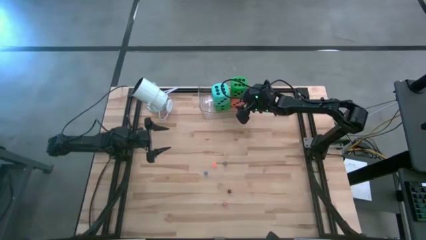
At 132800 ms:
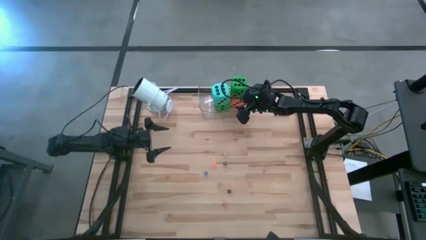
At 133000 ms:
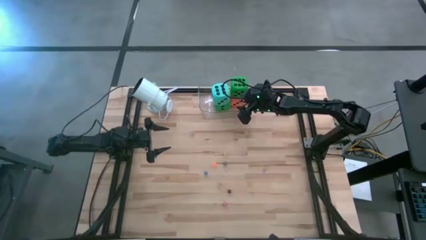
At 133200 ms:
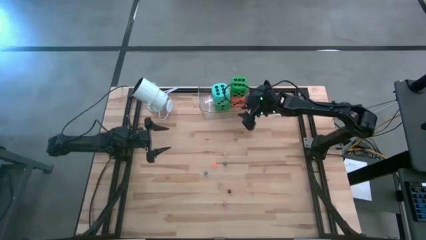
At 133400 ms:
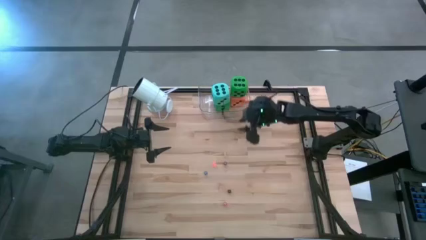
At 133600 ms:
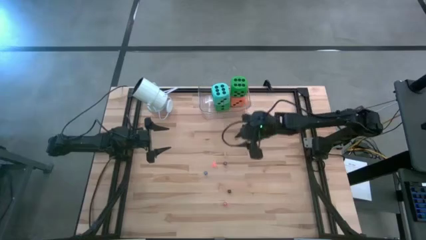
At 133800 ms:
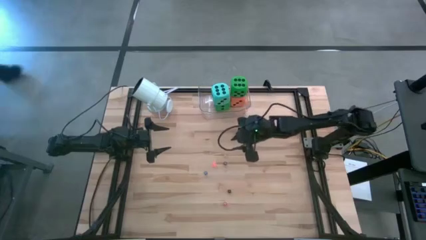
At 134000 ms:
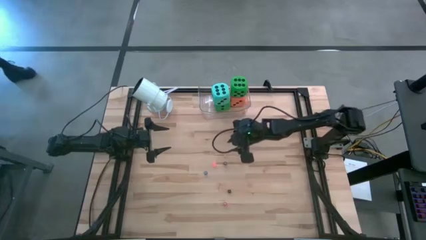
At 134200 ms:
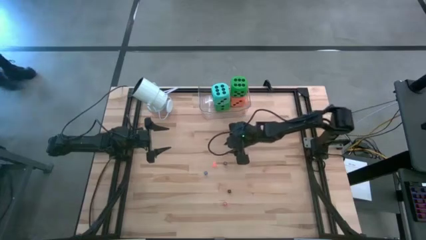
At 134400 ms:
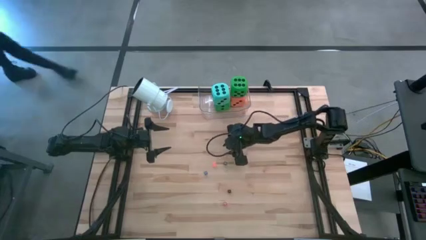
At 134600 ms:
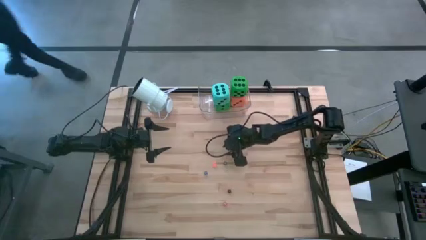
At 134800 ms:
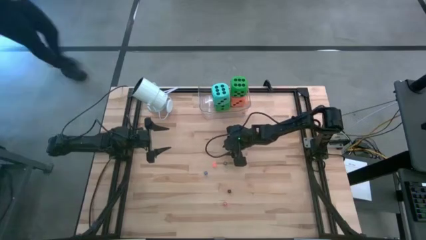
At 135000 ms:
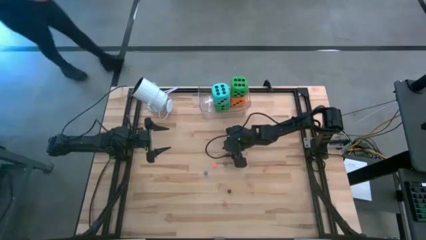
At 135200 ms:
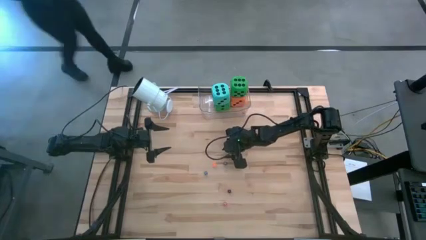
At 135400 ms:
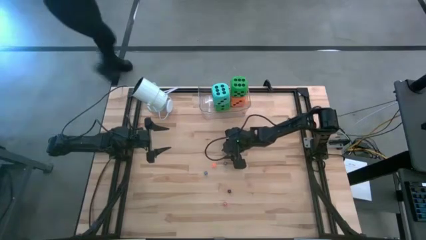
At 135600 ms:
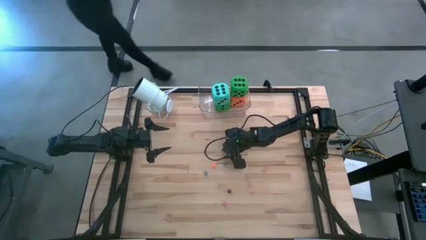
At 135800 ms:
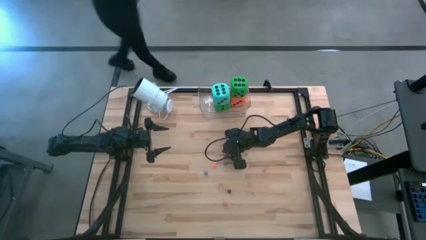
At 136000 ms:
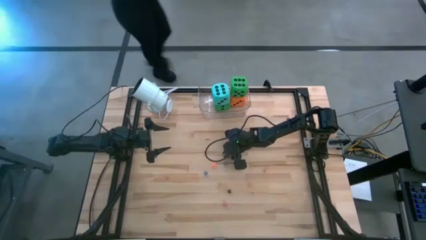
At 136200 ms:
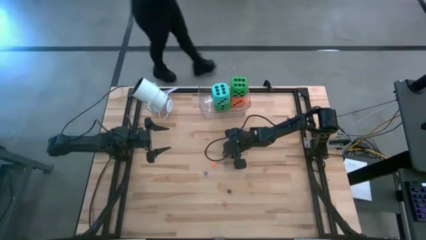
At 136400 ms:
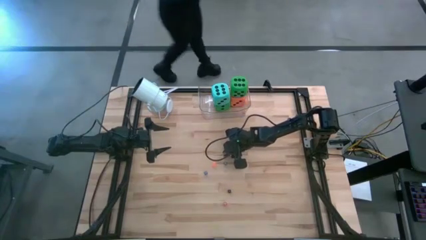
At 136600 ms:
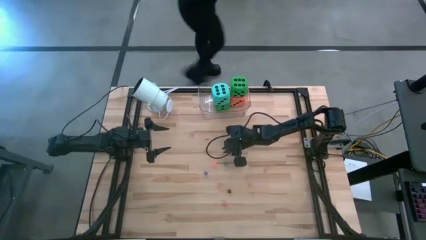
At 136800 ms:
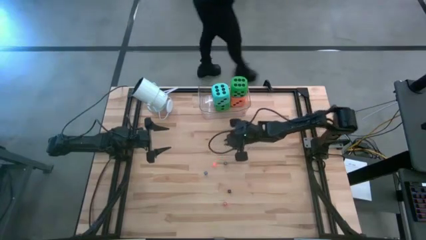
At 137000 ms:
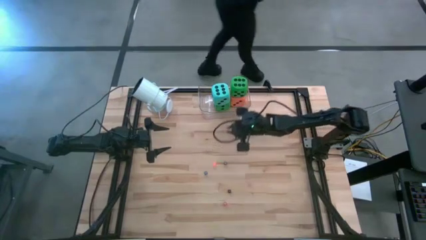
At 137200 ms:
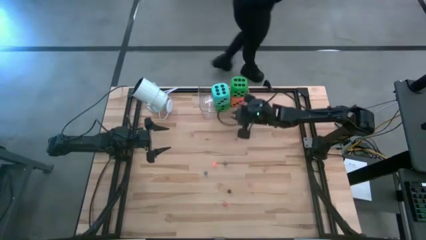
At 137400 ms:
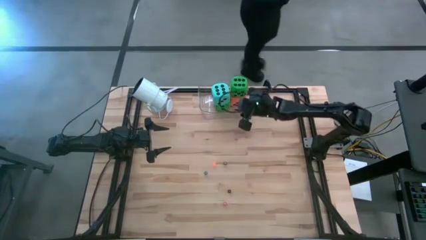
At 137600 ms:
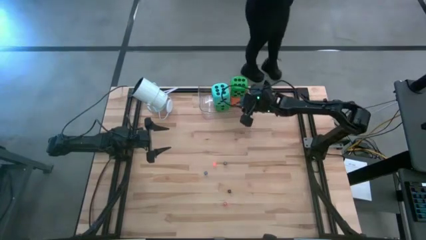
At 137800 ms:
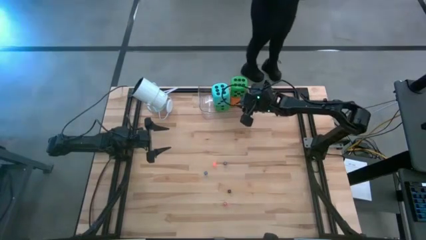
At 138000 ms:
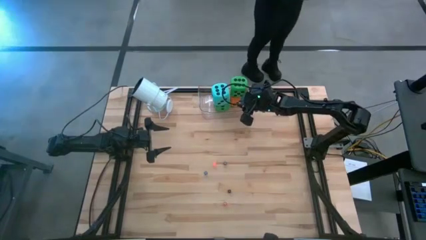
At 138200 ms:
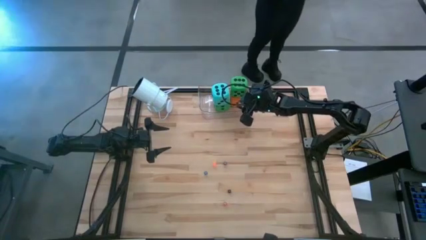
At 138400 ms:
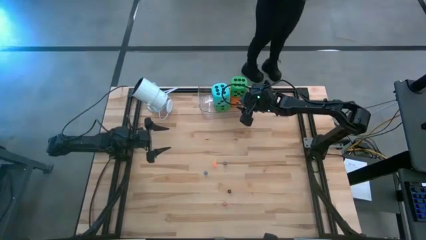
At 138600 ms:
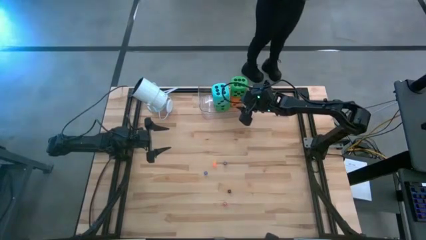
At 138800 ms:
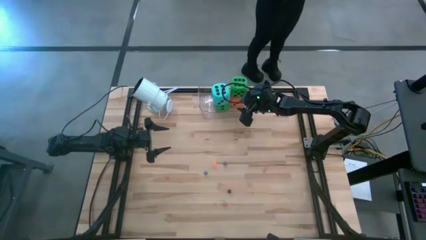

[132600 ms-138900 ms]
Task: Pick & Place Dice
Put the small yellow dice into the transparent bin

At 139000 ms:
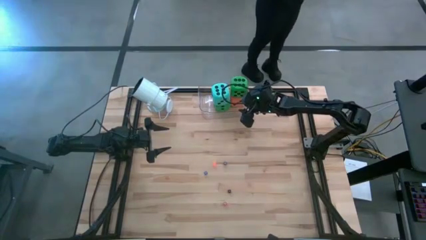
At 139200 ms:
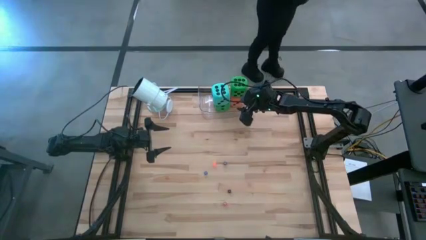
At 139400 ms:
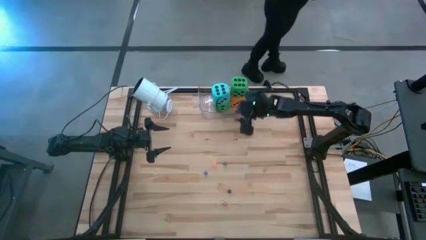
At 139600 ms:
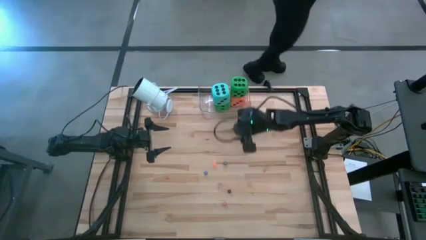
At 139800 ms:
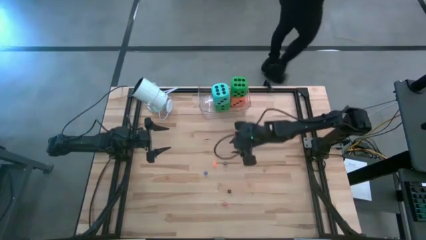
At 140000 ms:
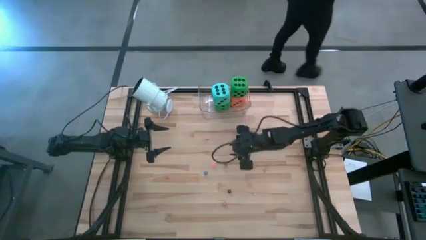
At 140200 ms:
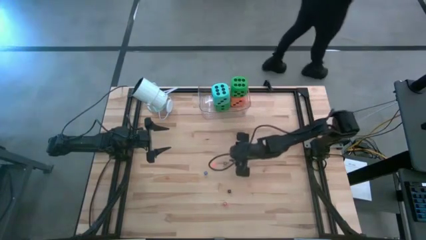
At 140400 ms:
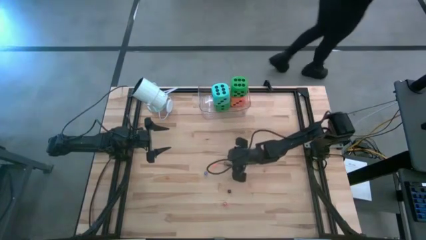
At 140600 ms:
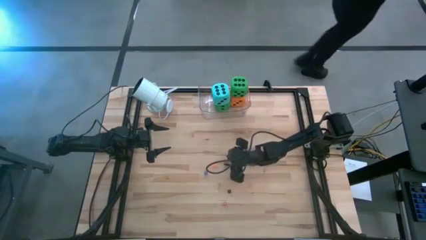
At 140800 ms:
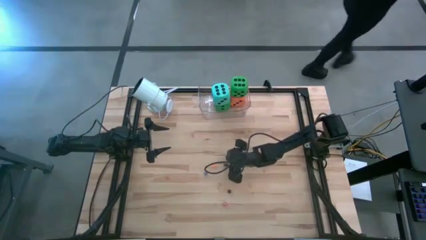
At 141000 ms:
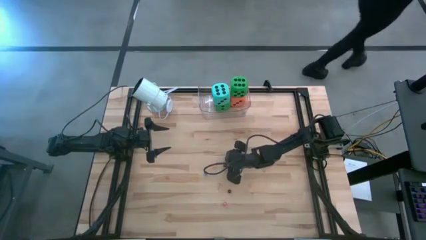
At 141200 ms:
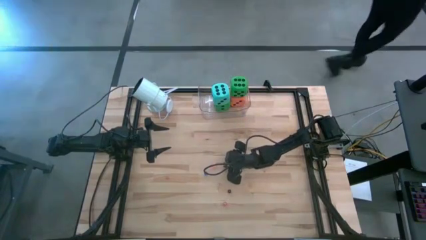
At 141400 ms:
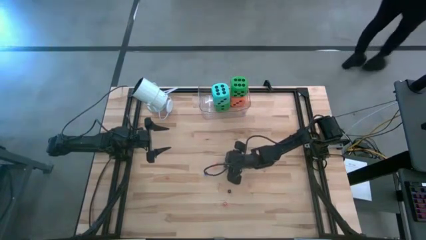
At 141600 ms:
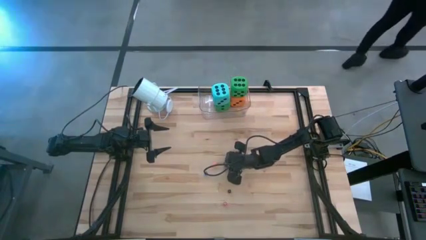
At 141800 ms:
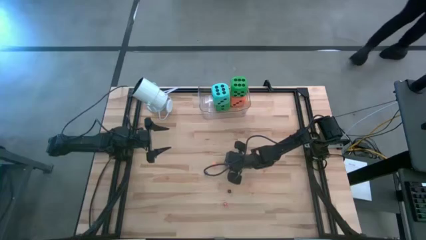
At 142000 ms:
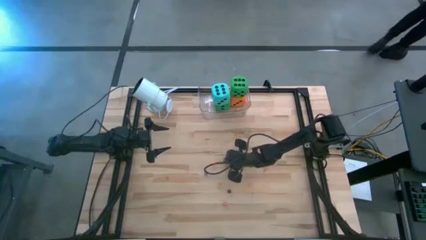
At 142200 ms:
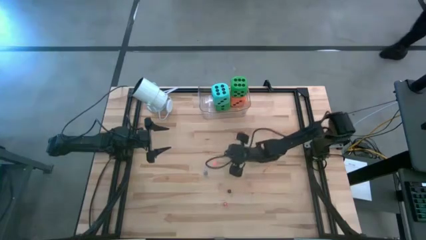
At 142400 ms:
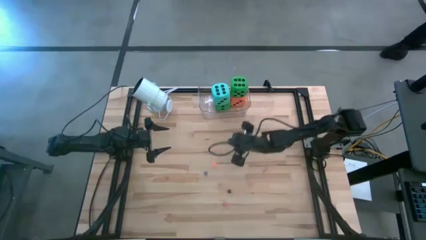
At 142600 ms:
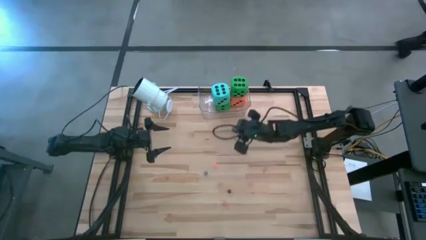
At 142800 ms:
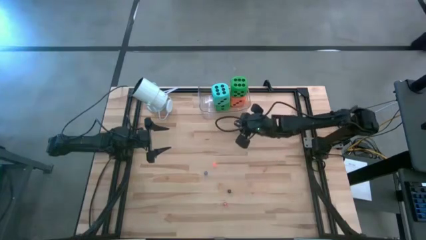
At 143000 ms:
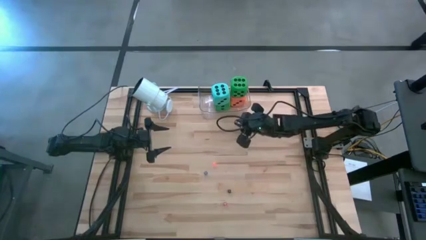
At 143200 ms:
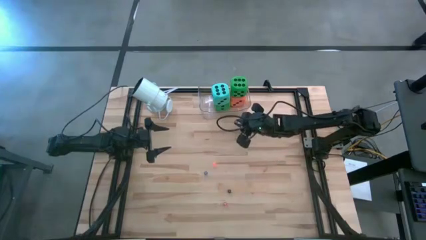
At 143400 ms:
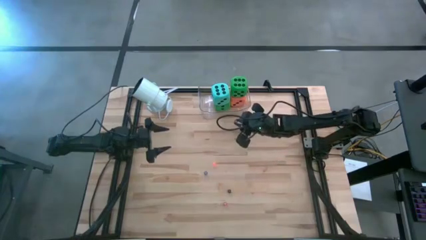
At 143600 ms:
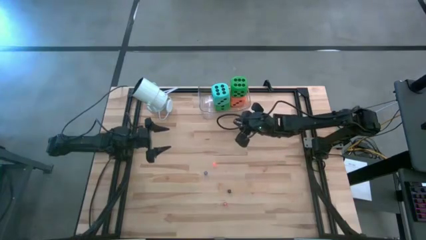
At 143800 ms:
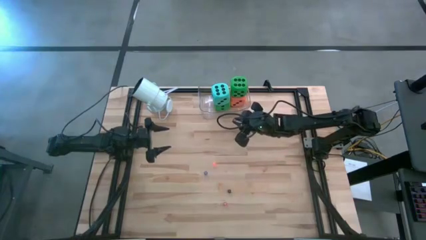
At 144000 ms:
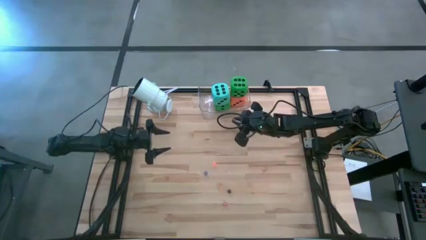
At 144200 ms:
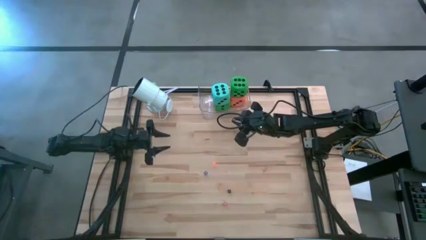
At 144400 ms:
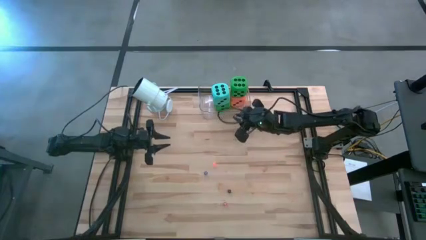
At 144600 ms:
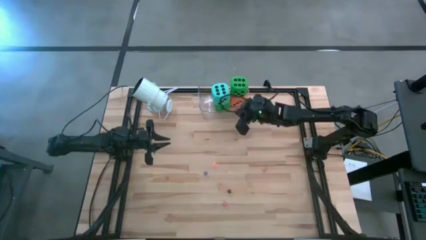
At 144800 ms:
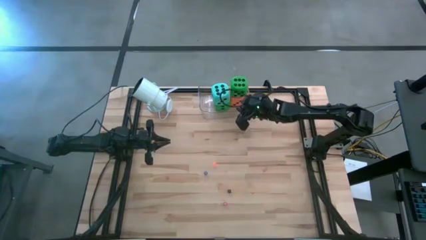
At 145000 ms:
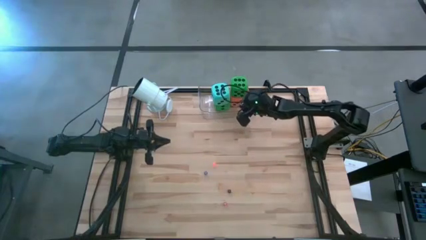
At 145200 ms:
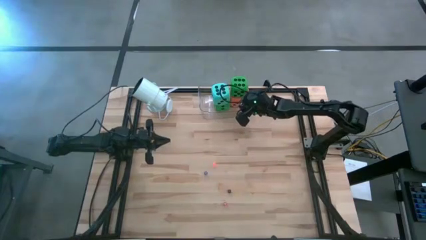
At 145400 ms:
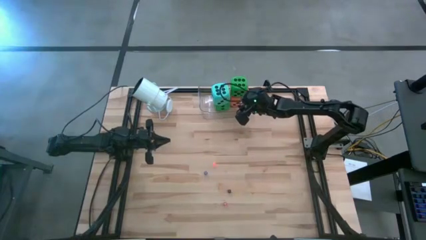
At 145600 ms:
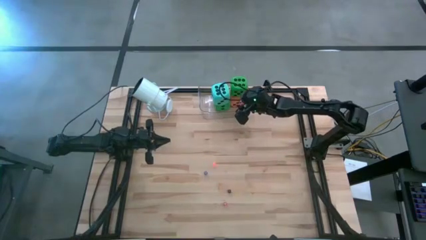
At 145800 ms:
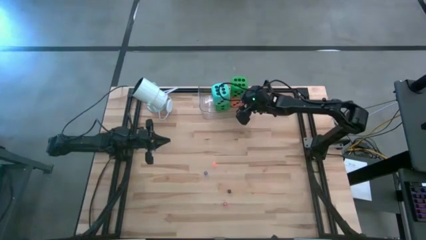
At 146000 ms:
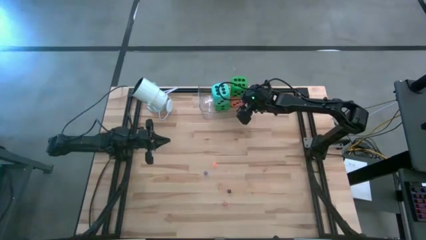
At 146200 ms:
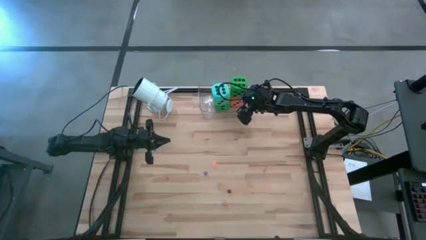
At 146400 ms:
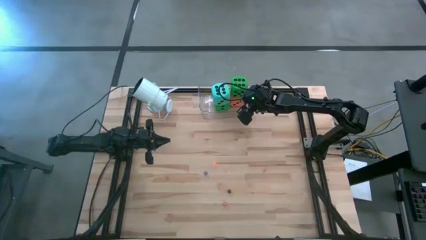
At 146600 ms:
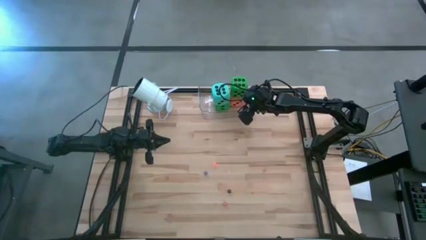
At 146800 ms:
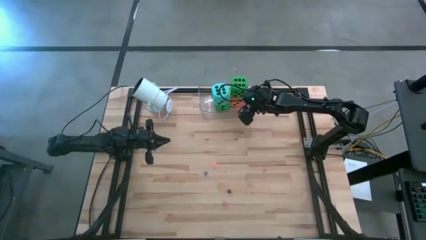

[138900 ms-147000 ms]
Put the top small black dice into the transparent bin
